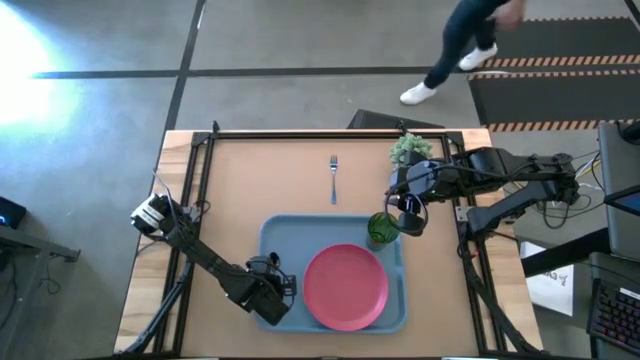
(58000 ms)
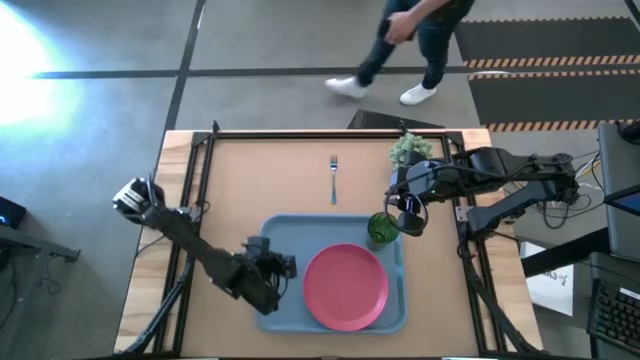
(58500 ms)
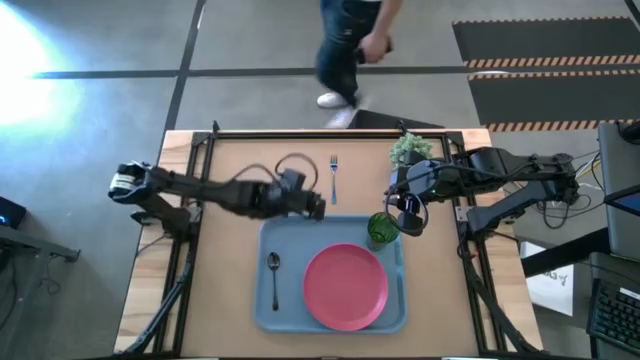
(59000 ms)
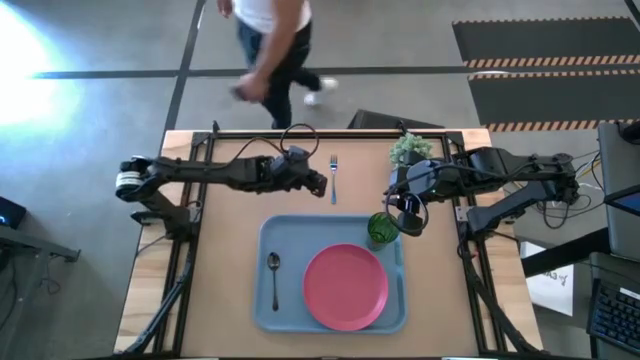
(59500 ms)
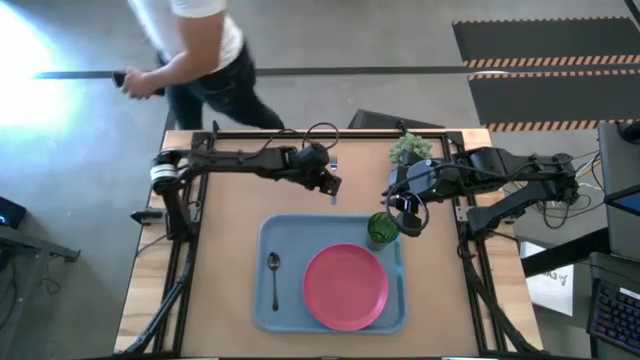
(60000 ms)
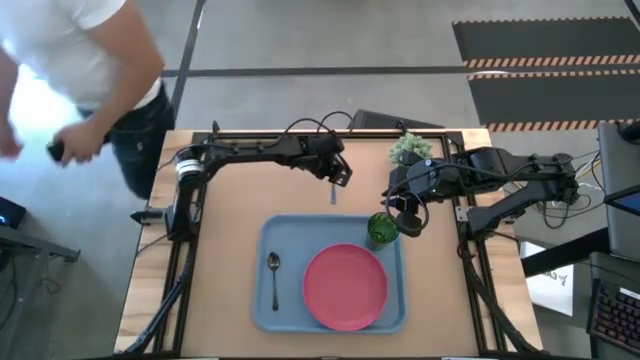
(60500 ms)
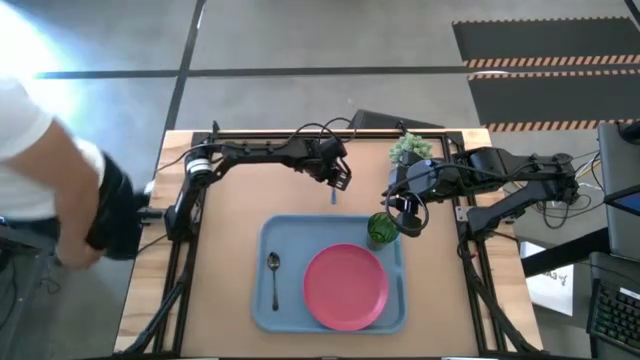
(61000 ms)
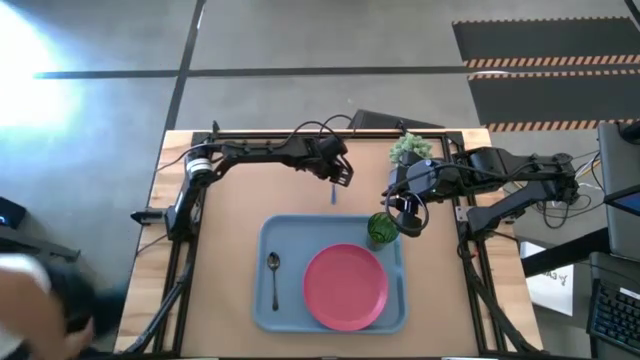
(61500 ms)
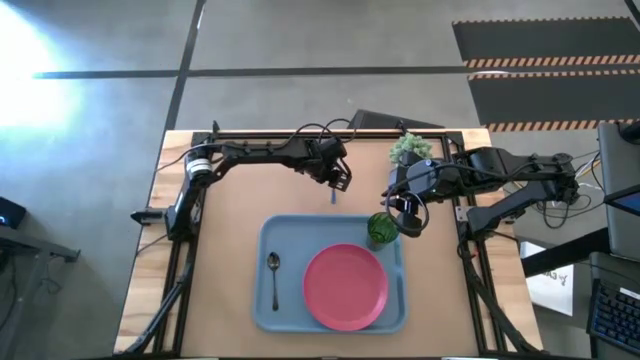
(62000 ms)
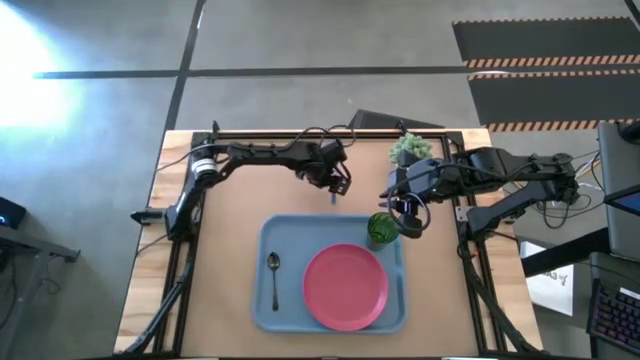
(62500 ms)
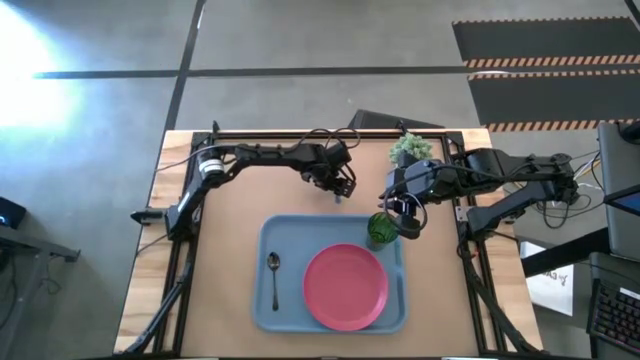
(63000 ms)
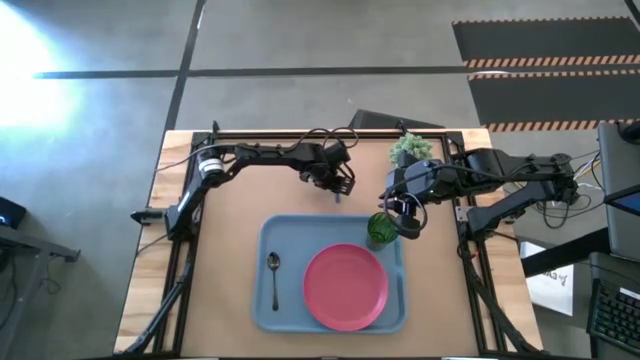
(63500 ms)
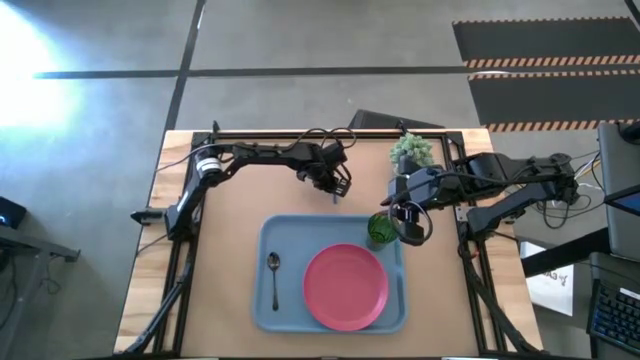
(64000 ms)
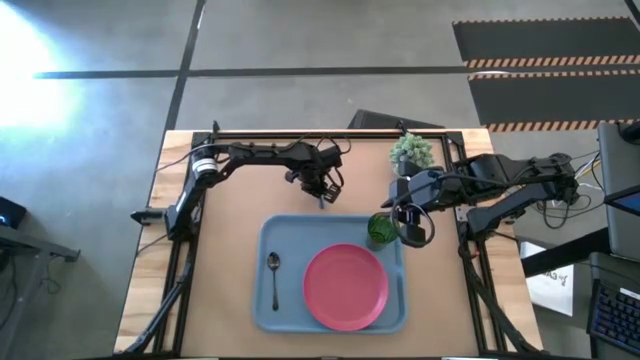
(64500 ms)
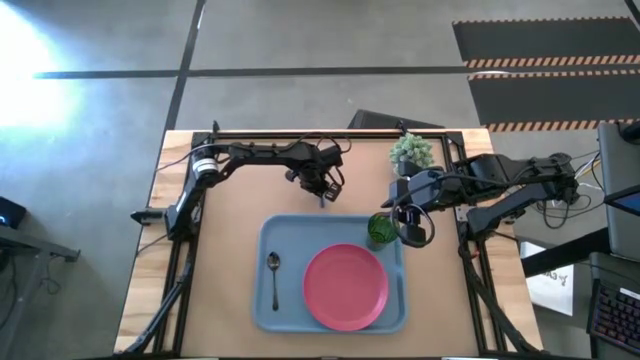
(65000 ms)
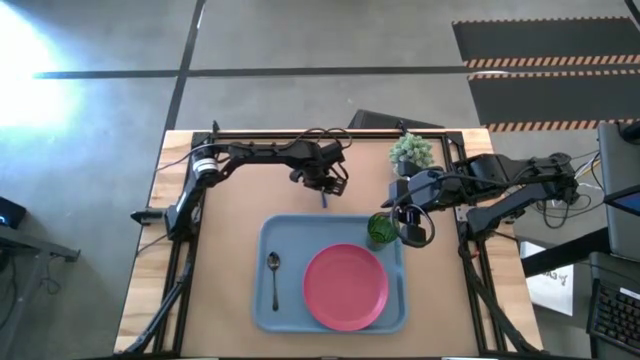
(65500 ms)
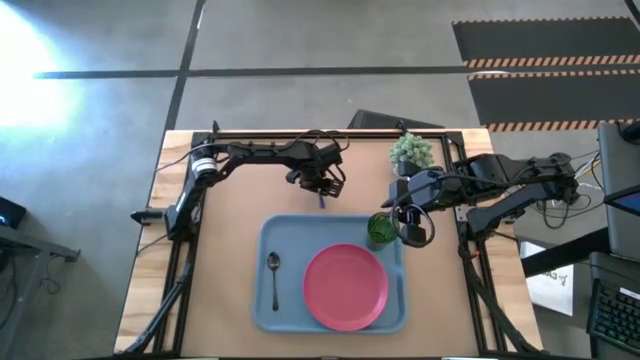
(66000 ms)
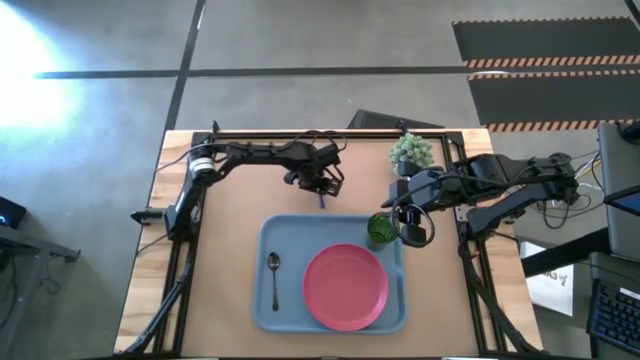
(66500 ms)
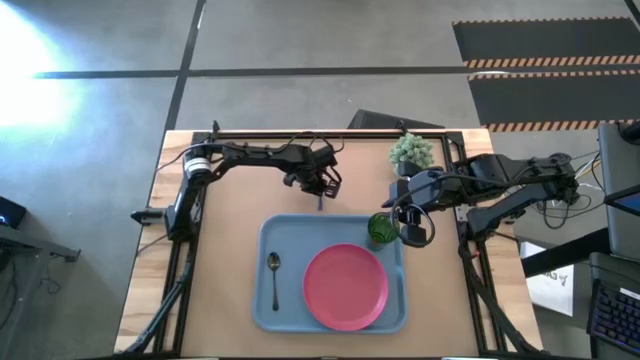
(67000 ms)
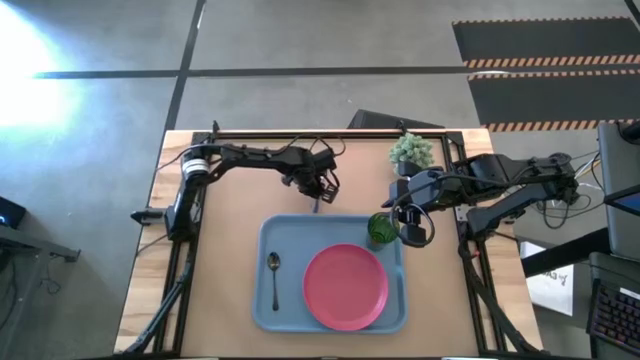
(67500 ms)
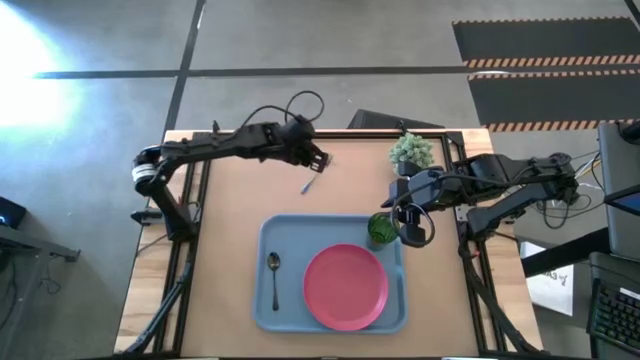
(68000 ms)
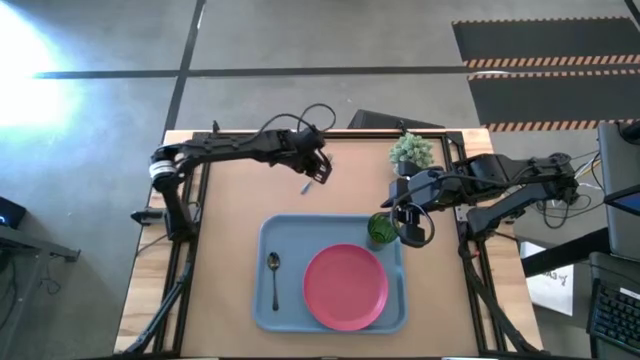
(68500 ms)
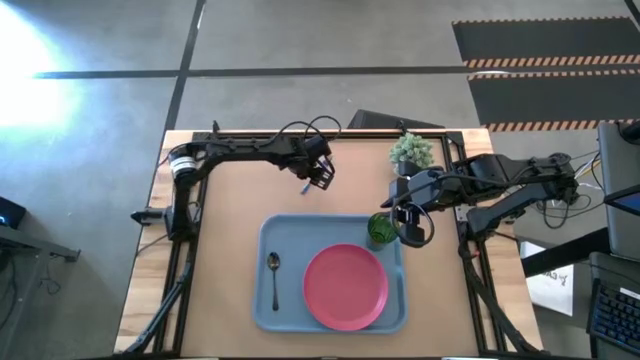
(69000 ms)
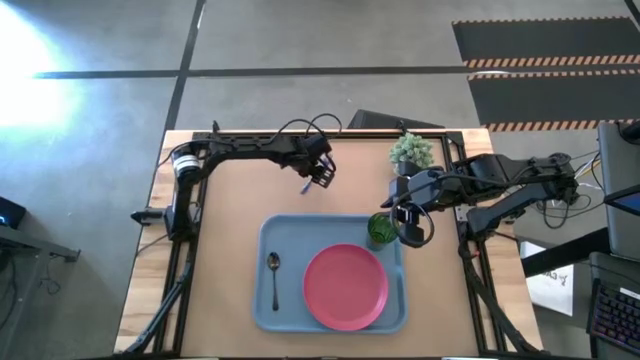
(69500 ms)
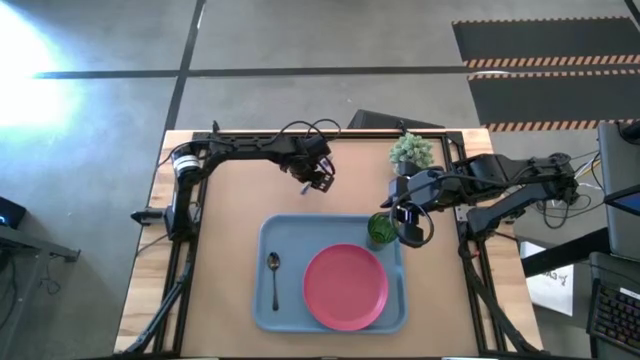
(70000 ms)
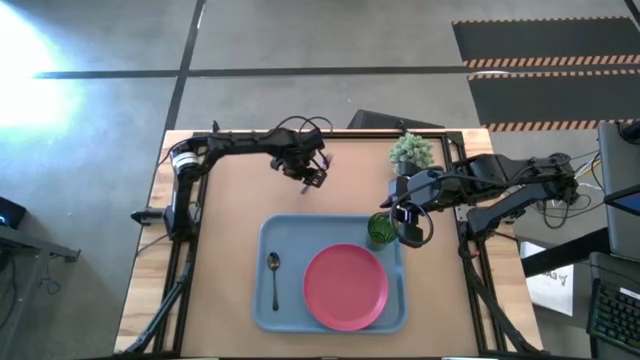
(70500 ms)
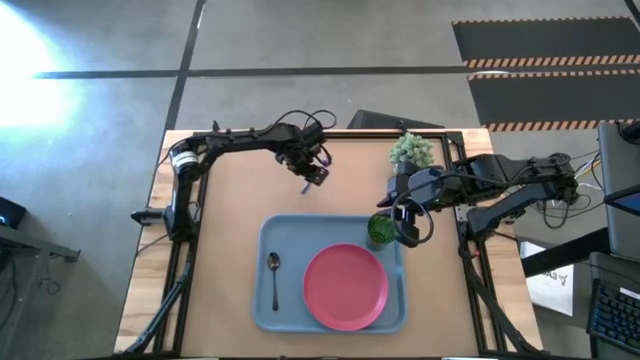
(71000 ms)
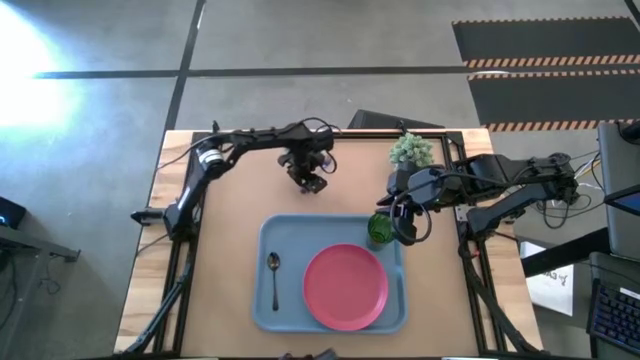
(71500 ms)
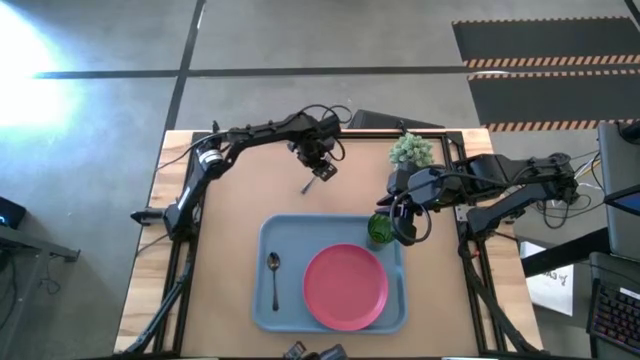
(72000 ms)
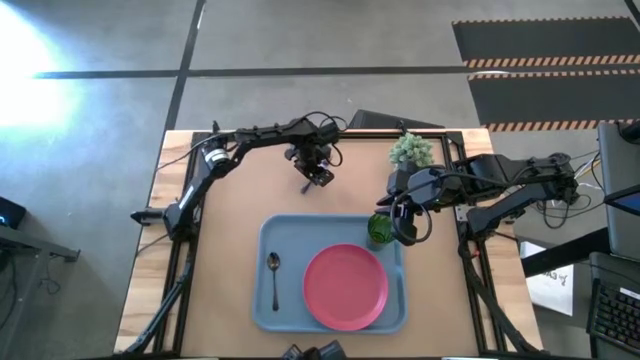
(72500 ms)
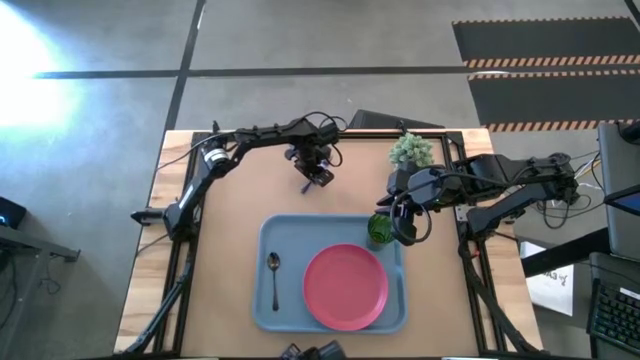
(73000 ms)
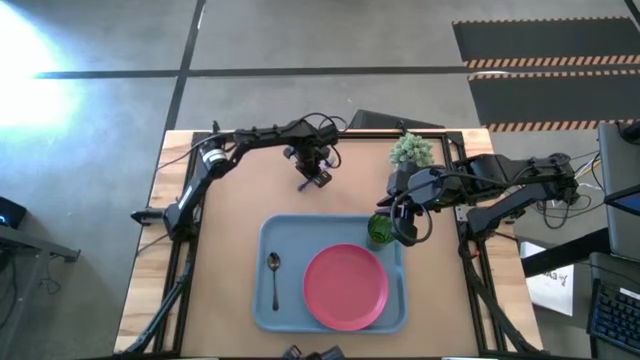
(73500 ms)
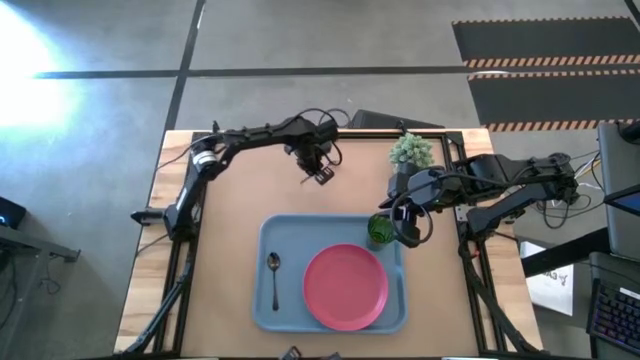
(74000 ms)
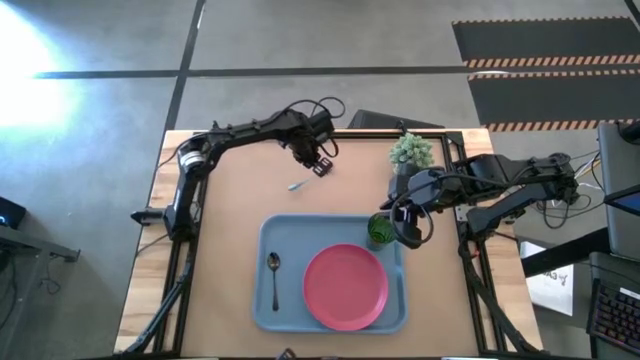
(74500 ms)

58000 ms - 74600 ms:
Task: Pick and place plate/cup/fork/spoon on tray
Put the blue fork on the blue tray to the left of the pink plate

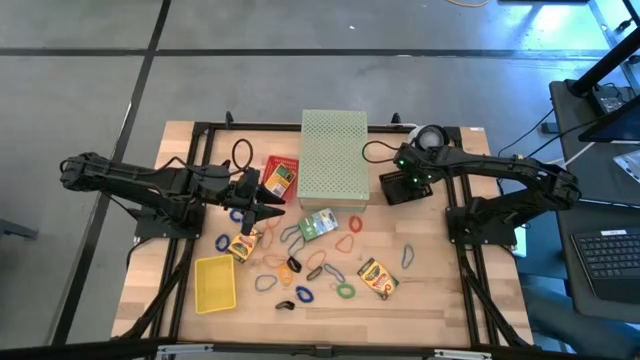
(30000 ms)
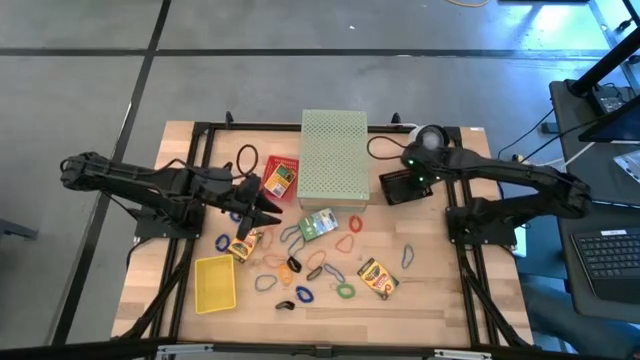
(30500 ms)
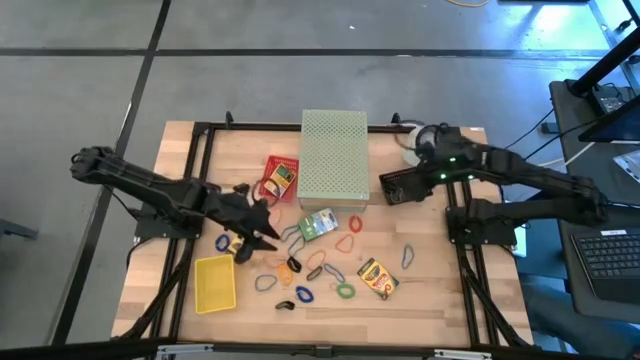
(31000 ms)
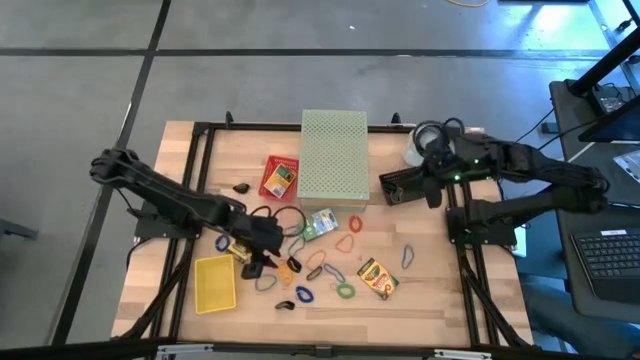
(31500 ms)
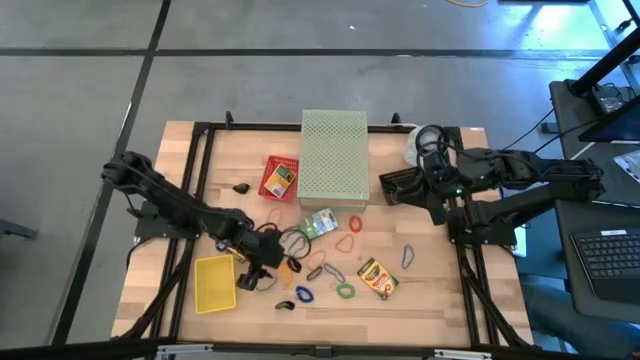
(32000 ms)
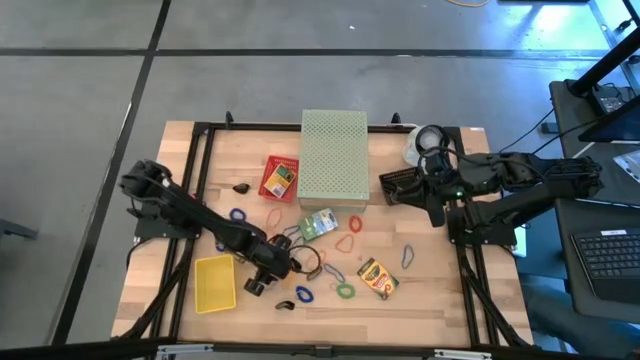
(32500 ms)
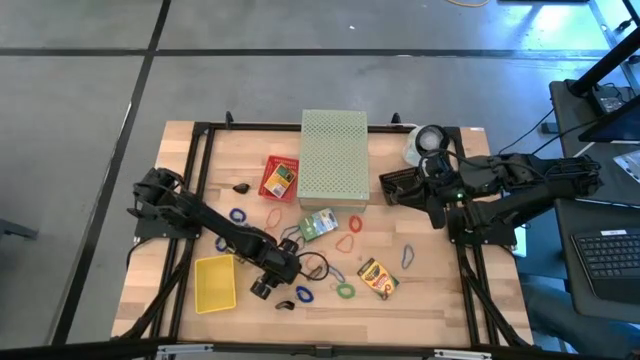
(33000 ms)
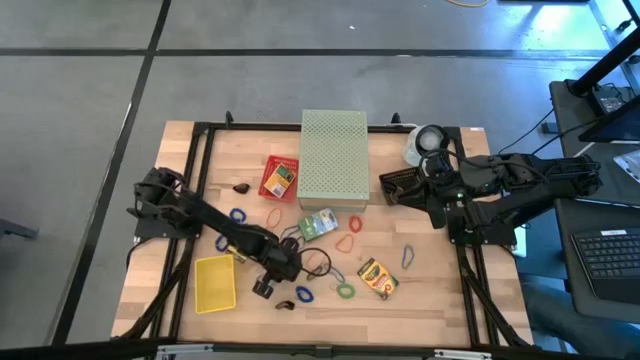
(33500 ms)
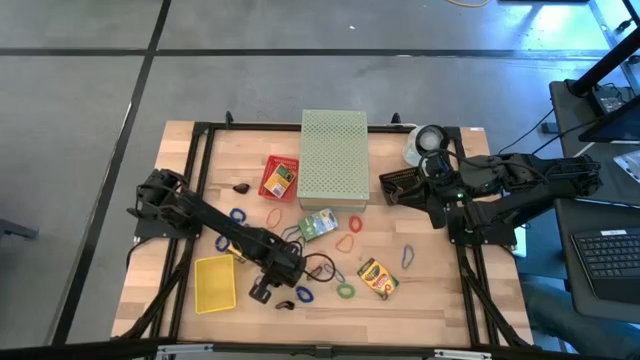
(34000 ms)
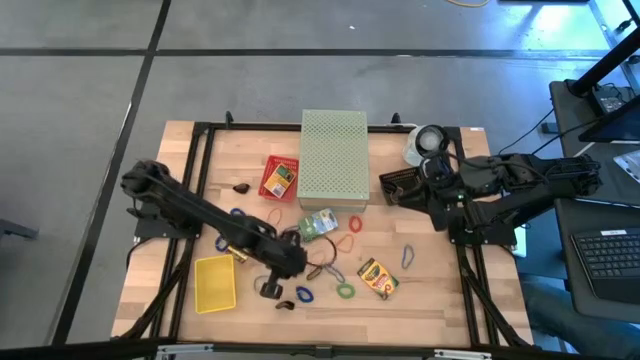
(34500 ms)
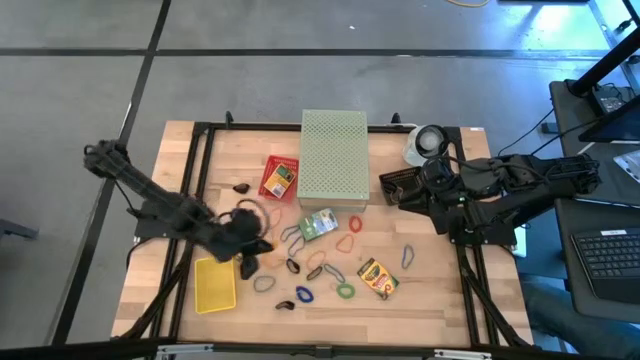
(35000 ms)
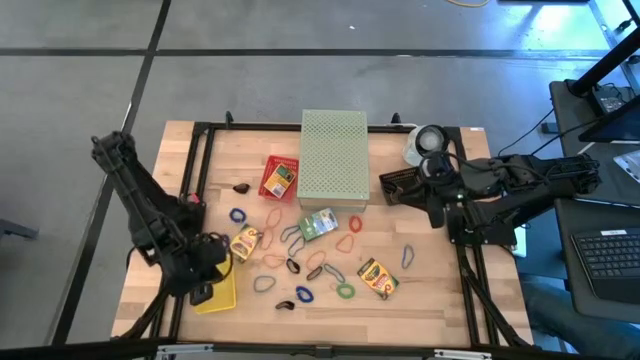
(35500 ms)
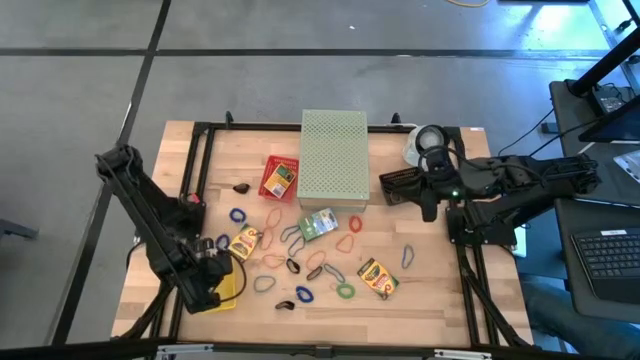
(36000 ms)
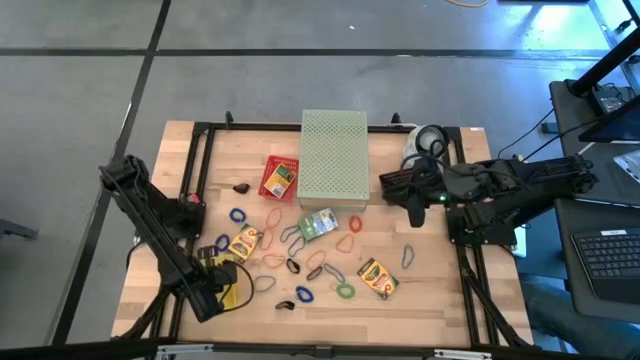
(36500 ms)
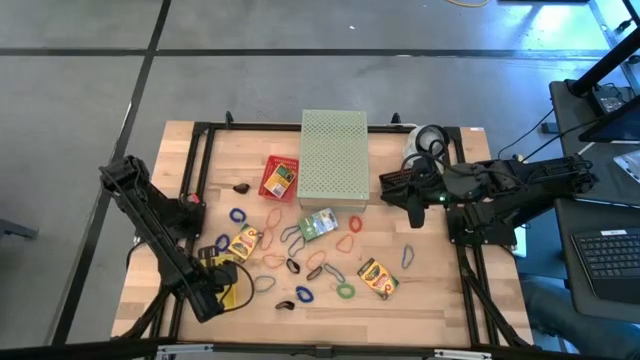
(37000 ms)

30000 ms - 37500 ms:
Task: Pick & Place Office Desk Supplies
Put the yellow spring rubber band into the yellow bin
